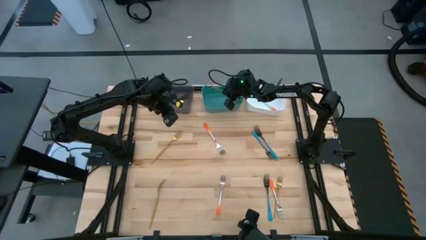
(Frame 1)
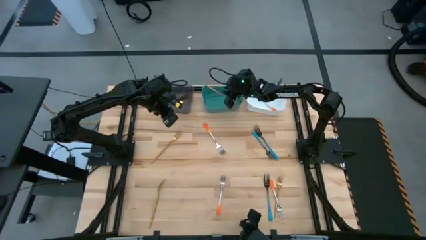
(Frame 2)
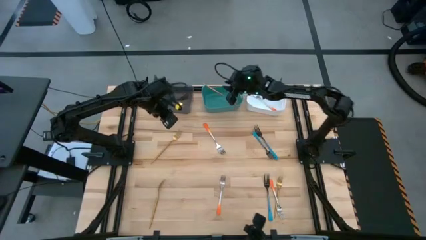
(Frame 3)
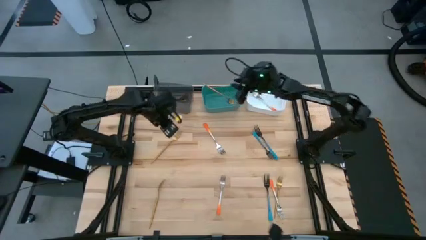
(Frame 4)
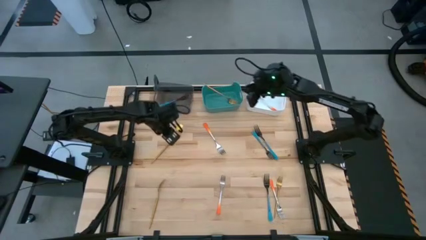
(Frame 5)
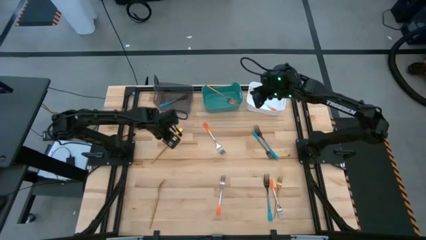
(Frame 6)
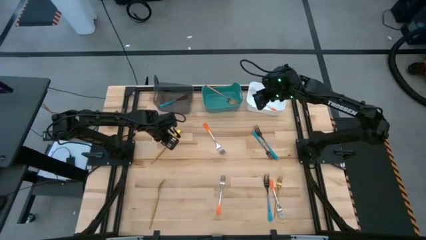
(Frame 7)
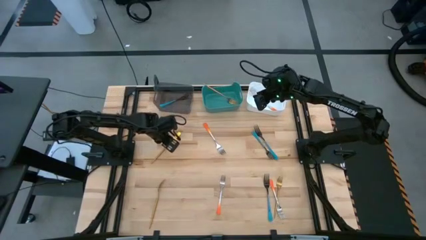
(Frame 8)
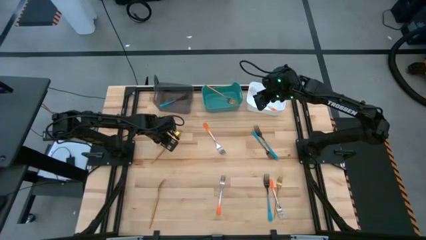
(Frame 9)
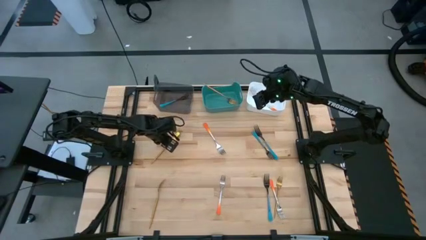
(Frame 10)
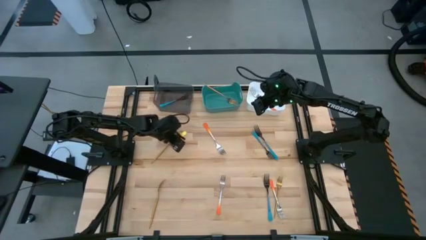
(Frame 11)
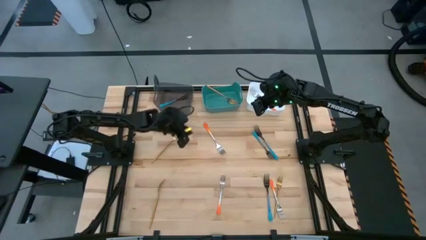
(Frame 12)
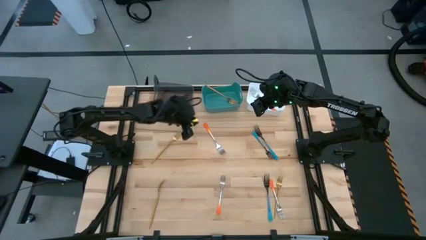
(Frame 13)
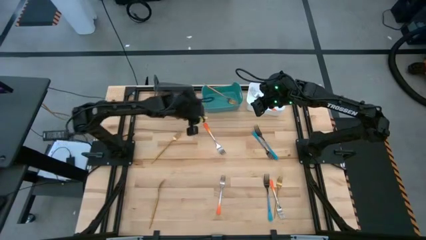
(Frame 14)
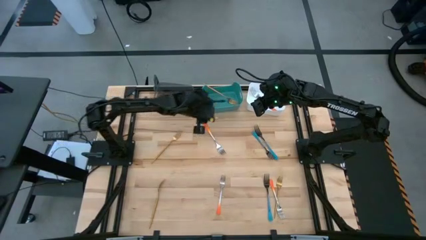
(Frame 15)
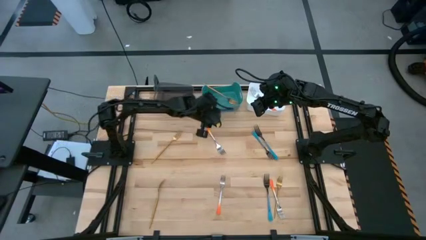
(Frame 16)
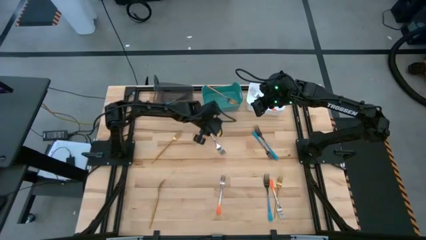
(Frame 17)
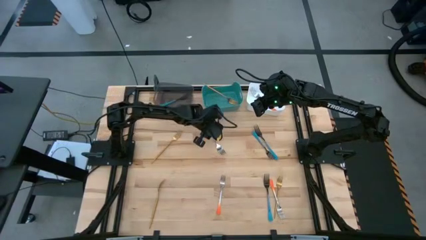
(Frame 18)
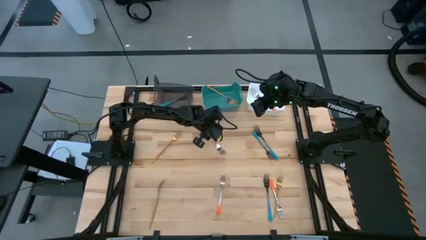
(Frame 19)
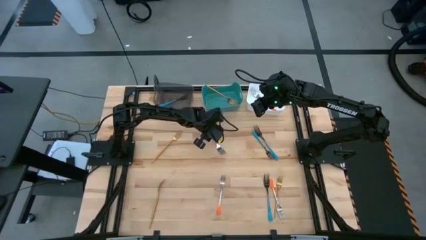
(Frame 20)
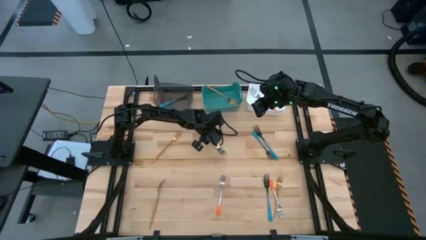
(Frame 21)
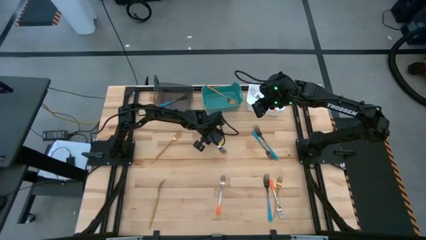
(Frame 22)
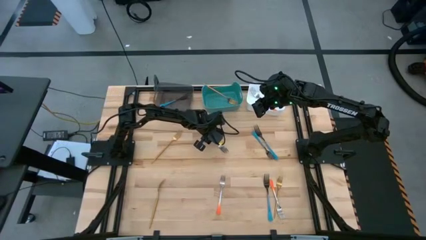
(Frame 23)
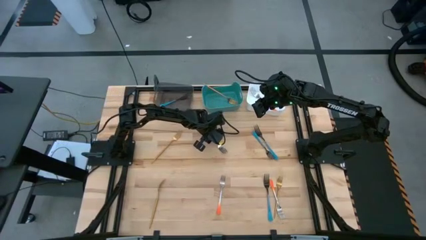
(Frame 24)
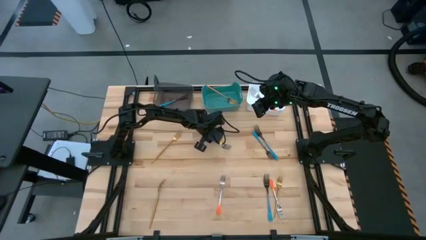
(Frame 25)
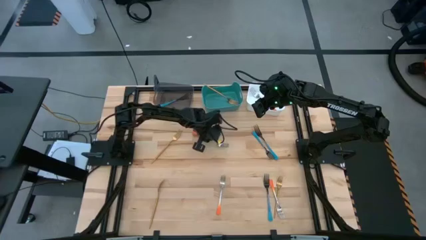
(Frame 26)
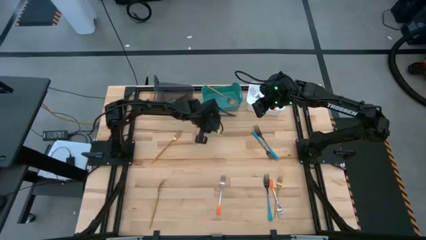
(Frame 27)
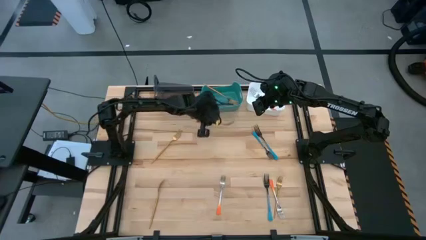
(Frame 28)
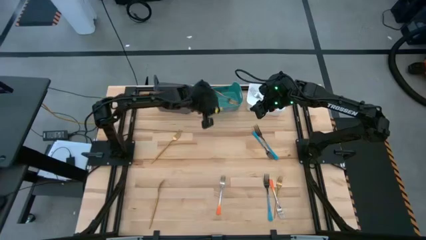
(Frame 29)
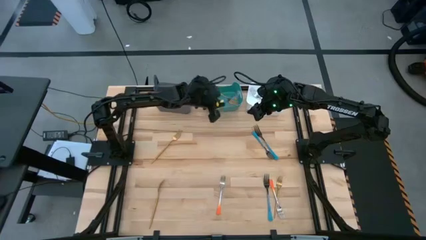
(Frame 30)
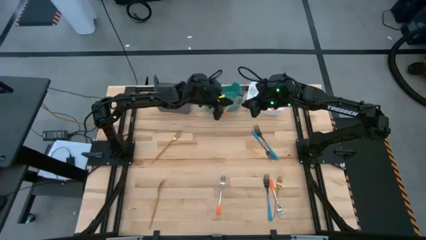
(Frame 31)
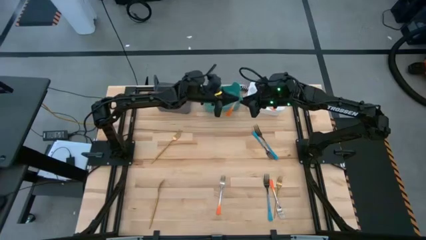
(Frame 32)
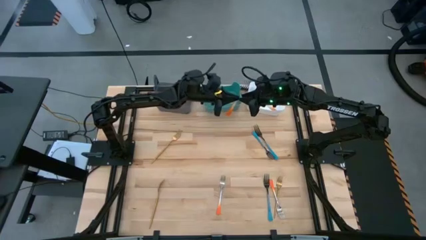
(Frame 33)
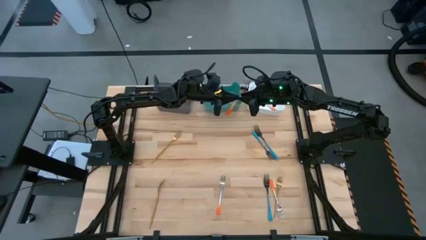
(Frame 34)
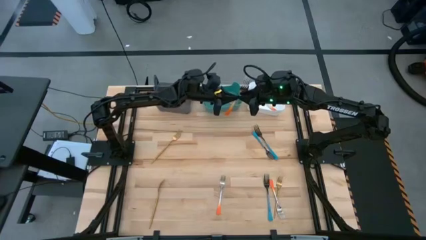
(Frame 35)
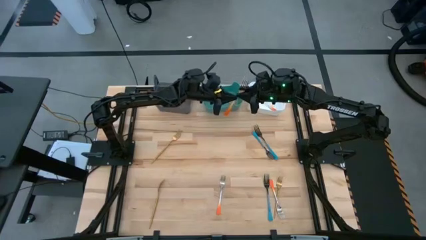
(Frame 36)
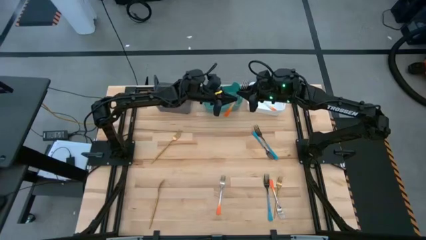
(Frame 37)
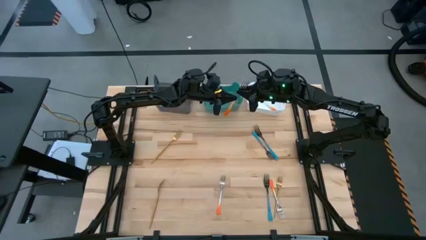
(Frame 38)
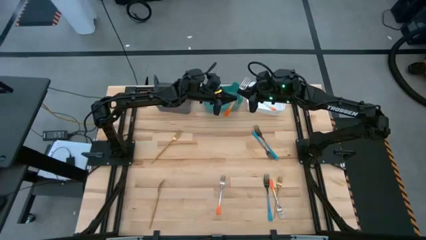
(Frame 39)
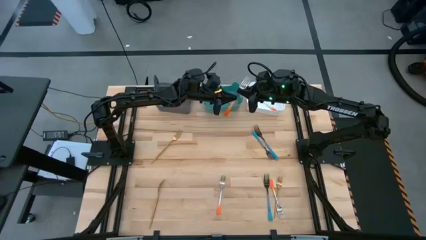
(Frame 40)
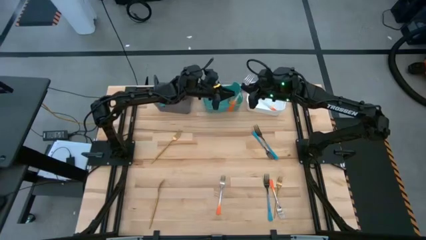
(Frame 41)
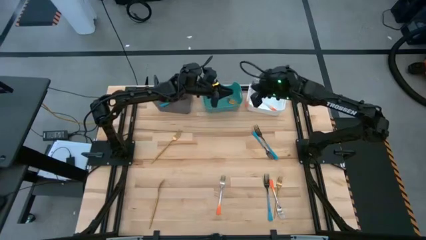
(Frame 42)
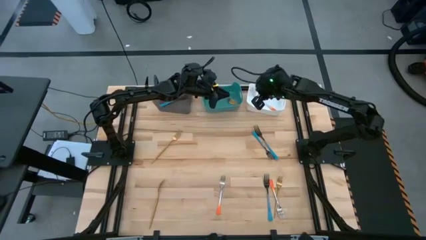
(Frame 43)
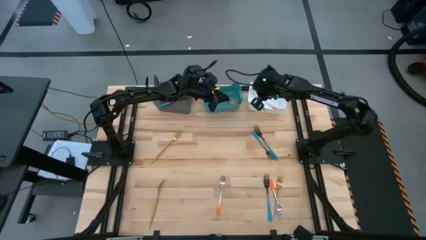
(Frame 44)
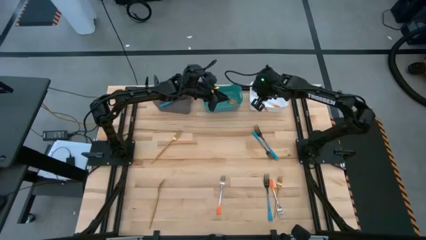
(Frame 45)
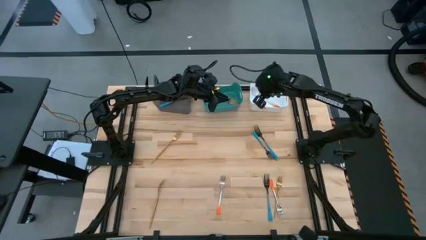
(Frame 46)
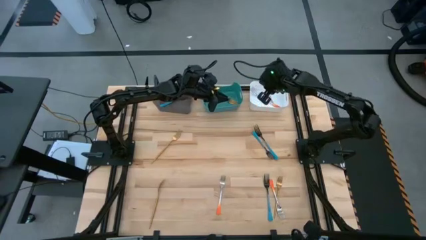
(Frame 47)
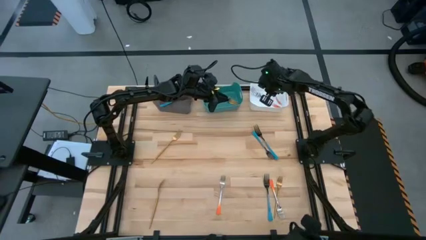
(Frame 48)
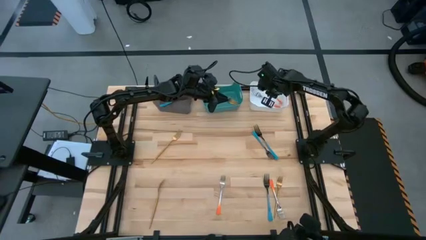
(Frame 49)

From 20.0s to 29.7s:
Task: Sort silverware by color (type)
Put the orange fork into the white bin

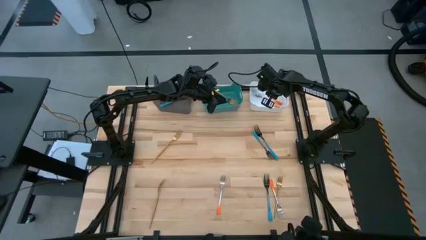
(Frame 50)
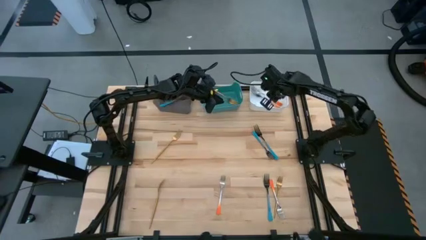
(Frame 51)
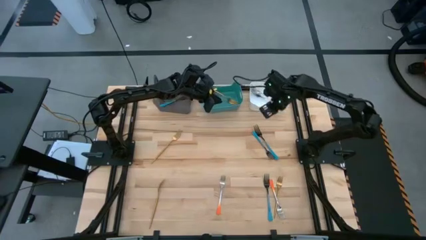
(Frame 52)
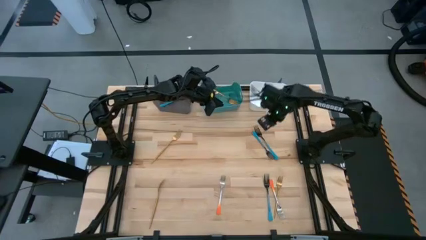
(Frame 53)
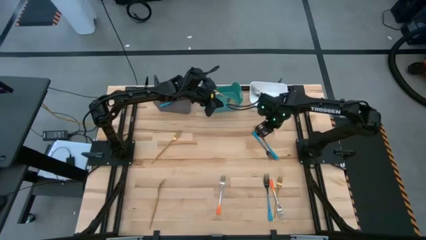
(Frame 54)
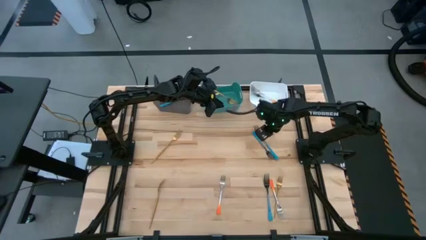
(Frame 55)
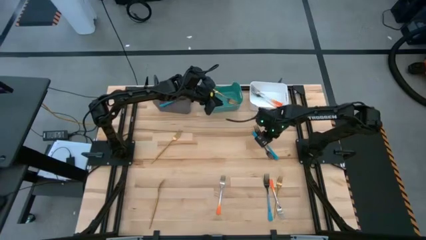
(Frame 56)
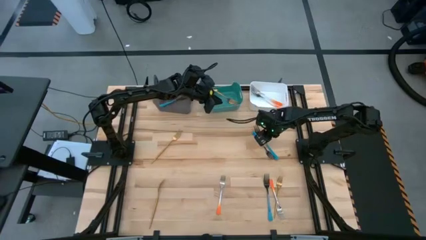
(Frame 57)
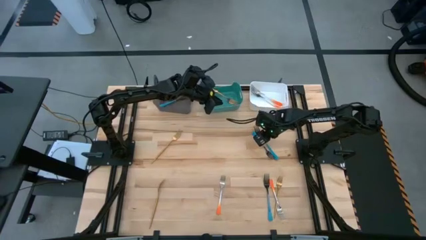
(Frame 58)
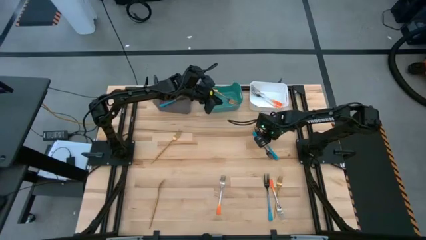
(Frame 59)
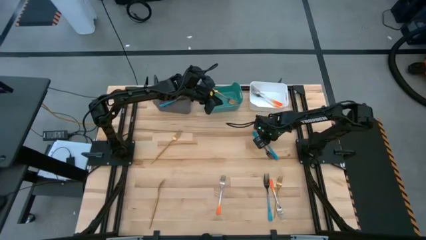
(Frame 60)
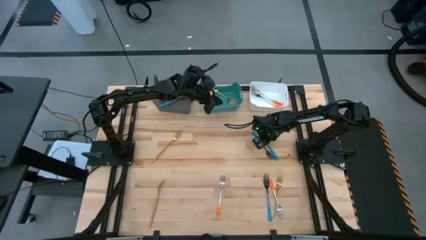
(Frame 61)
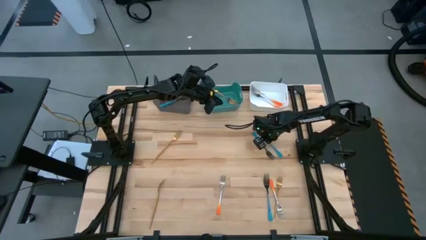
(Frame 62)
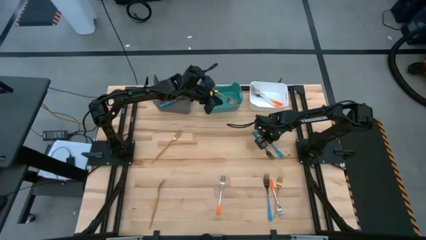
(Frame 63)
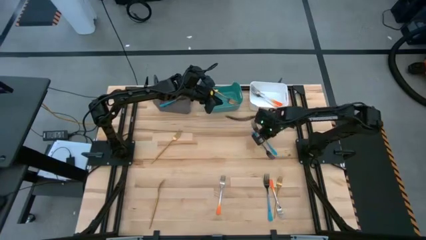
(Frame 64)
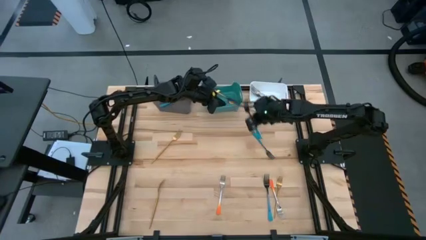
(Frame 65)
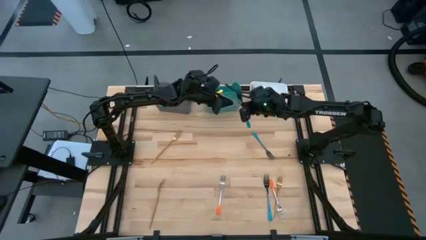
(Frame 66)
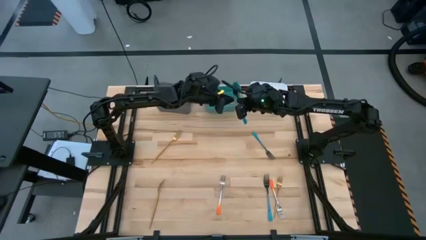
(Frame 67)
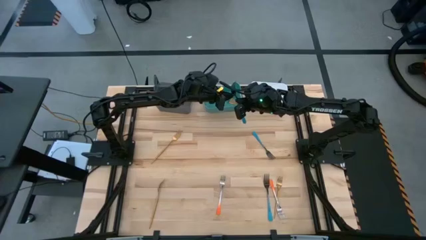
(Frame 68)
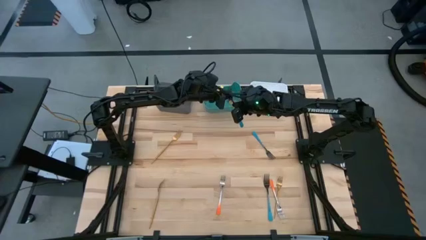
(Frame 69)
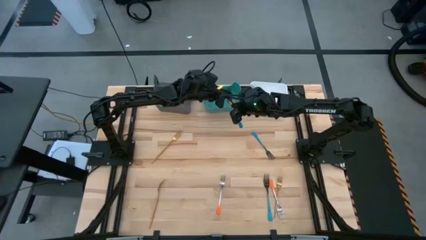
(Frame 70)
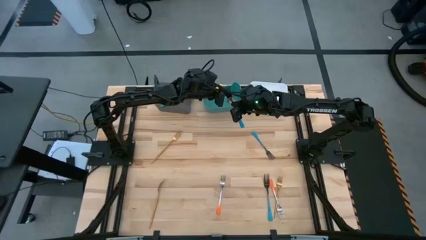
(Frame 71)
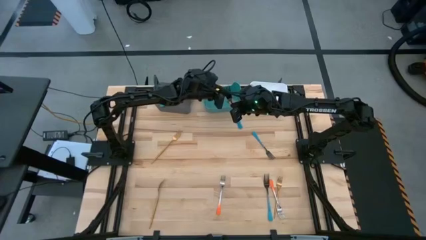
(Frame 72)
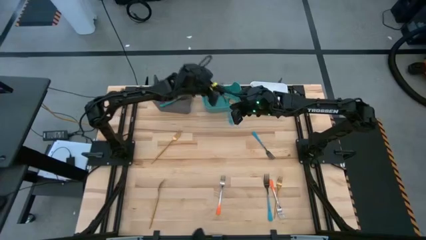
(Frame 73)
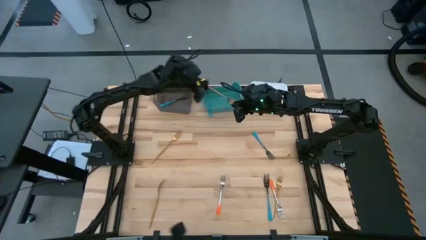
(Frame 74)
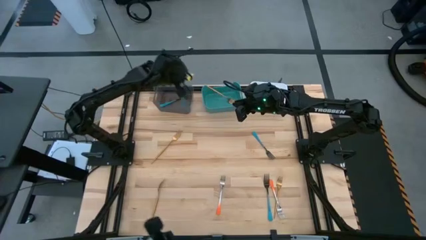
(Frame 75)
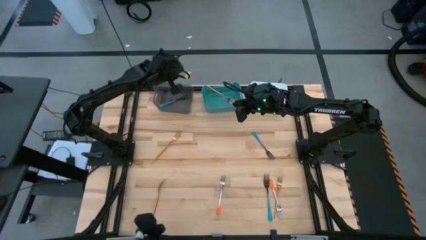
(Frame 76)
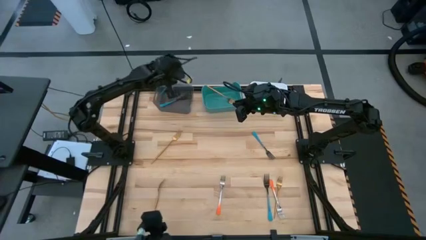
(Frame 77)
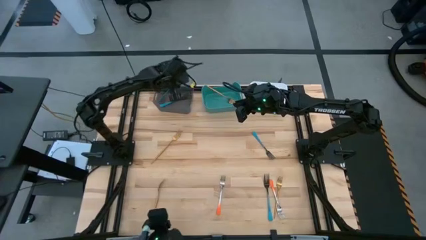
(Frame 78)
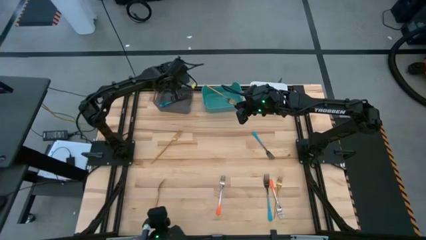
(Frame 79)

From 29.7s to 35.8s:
Put the blue fork into the black bin
